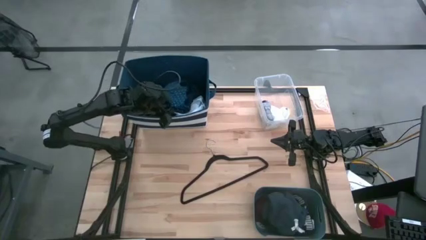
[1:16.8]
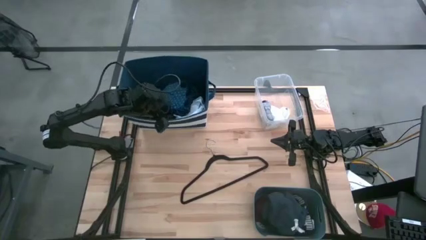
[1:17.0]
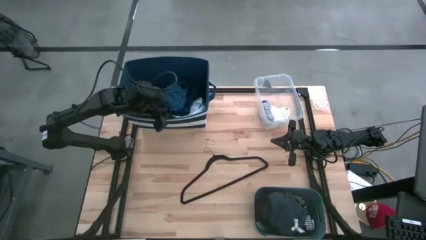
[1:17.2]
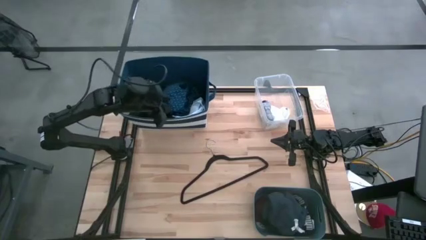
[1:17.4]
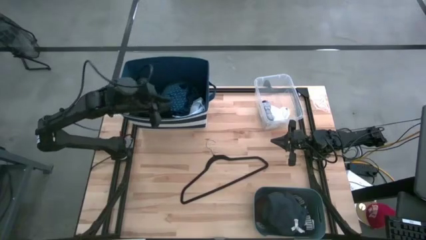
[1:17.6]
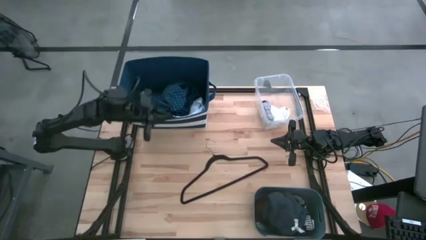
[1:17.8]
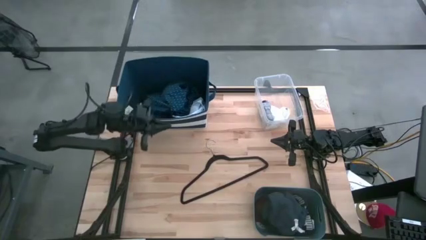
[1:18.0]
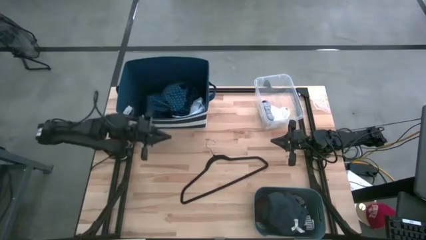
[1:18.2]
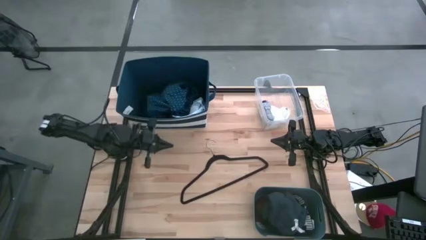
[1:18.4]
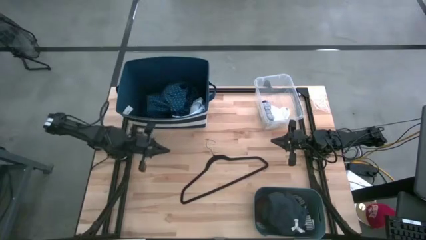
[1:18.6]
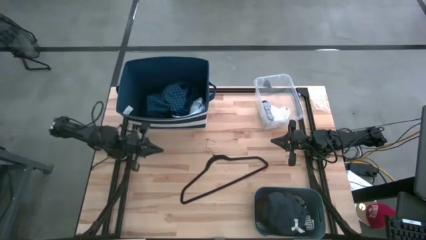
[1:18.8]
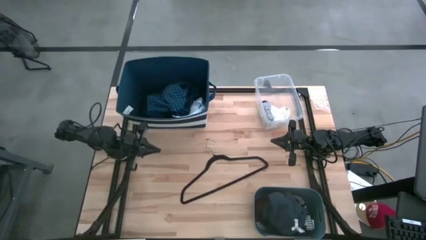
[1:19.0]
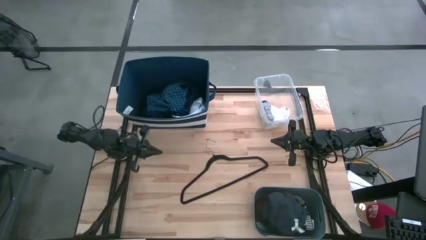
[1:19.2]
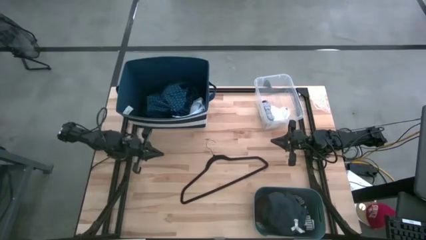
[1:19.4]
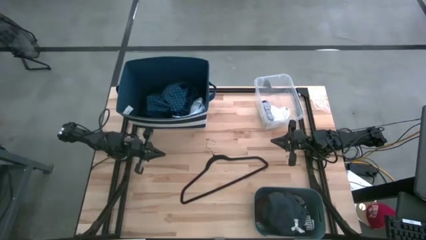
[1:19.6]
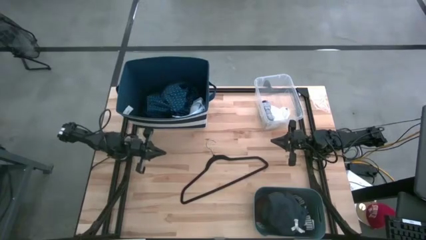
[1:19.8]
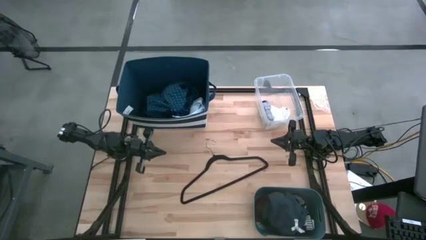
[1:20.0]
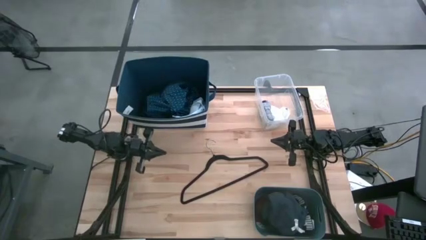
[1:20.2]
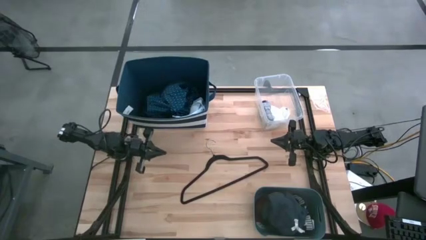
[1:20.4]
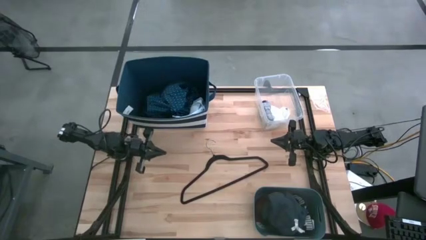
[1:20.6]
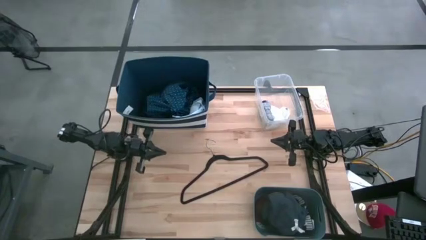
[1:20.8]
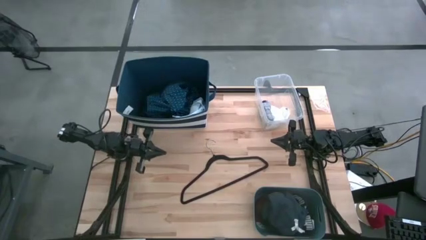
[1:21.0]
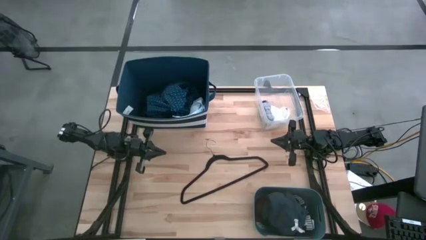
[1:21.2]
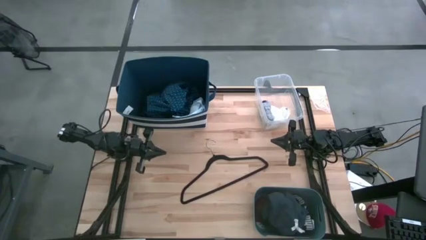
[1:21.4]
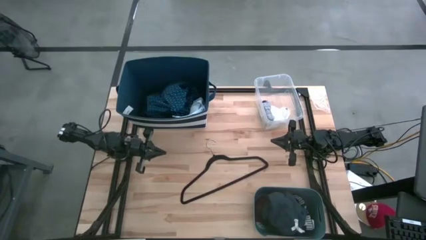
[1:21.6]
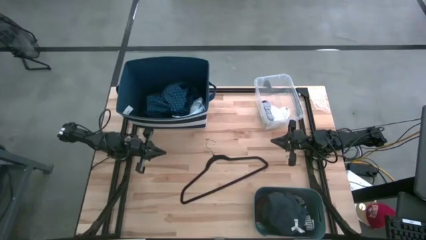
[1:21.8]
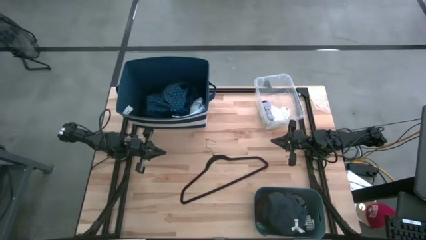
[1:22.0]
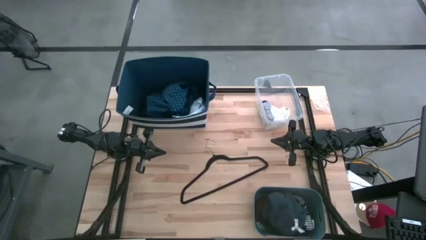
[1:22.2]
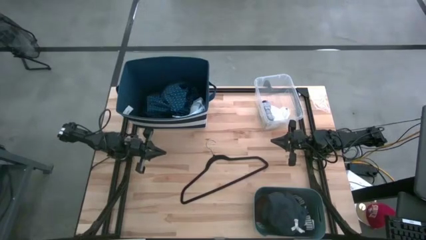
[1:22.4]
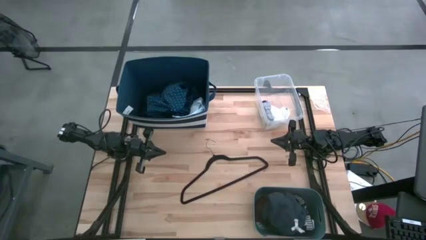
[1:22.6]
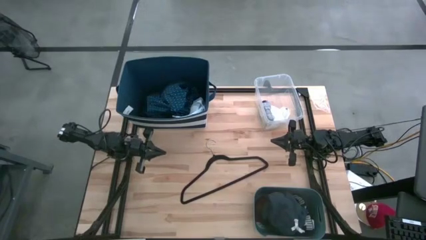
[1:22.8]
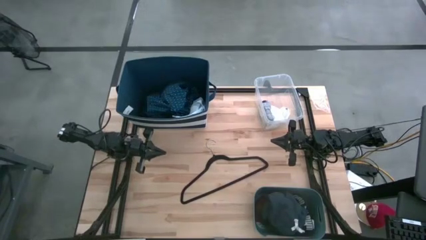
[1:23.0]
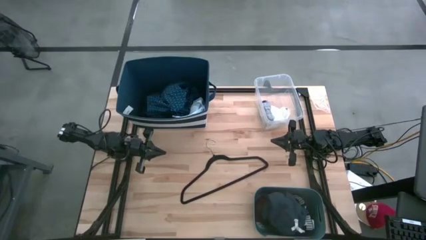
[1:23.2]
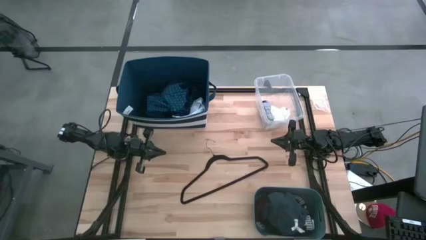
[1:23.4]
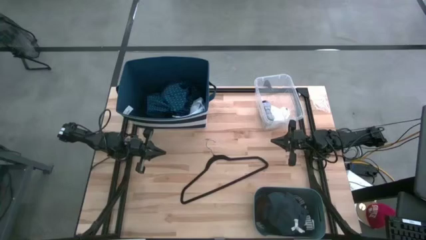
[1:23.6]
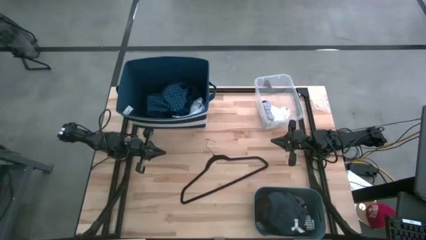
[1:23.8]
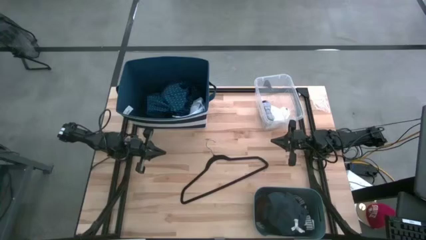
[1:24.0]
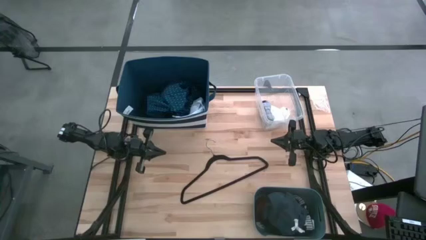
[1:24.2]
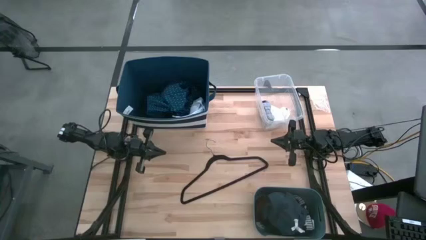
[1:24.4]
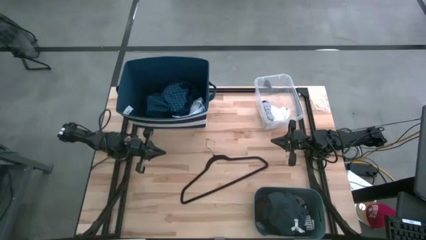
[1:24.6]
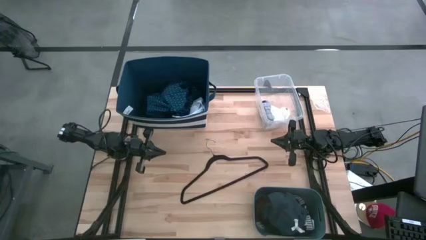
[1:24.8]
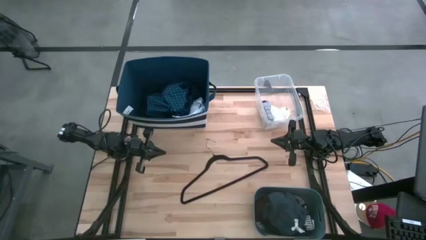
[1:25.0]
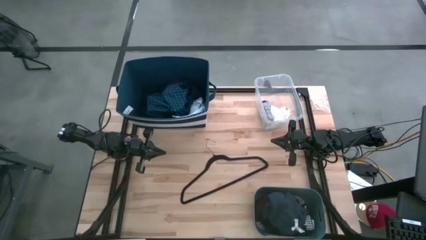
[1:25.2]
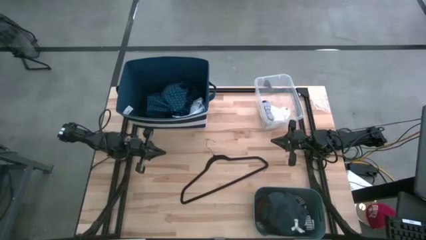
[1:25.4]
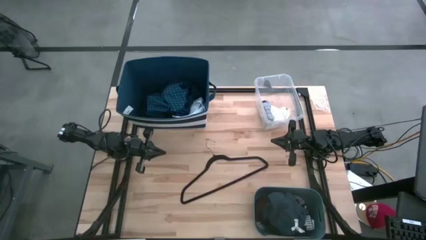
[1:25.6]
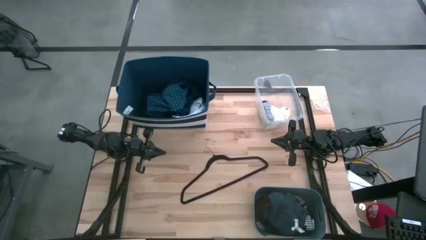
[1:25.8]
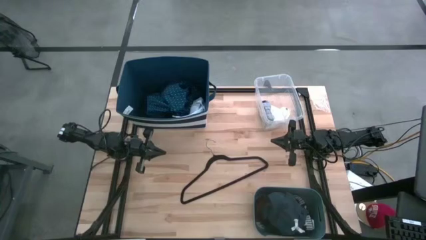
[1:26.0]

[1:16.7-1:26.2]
Task: Pick & Place Cloths
Return to Home Position

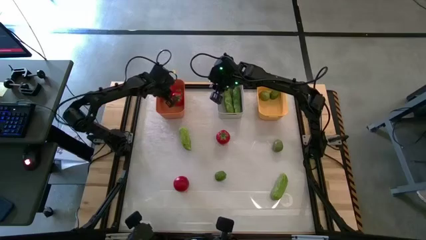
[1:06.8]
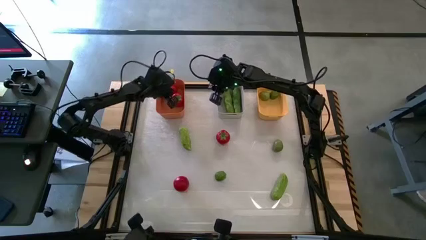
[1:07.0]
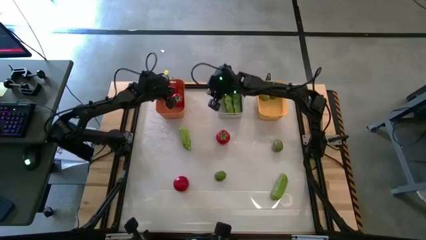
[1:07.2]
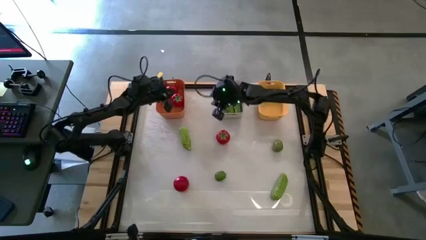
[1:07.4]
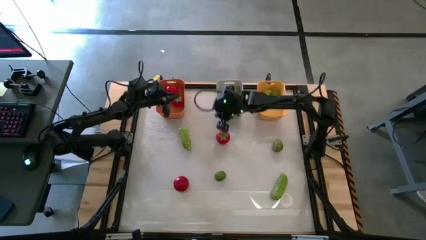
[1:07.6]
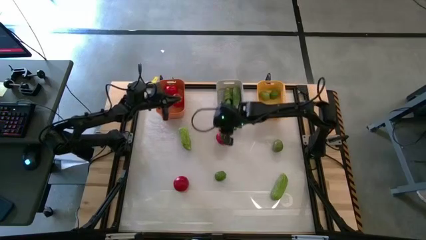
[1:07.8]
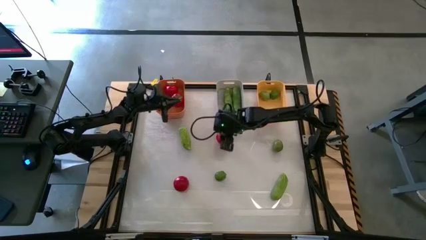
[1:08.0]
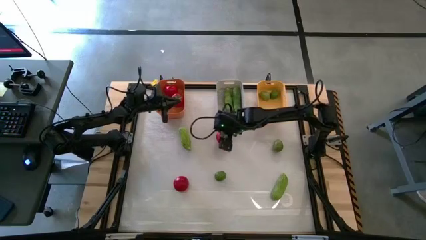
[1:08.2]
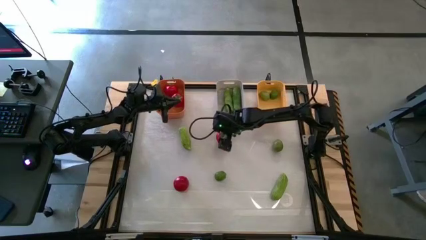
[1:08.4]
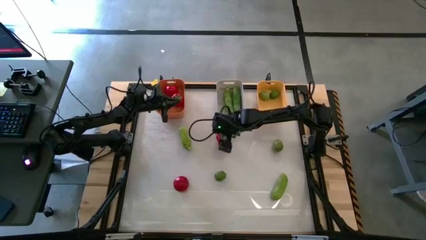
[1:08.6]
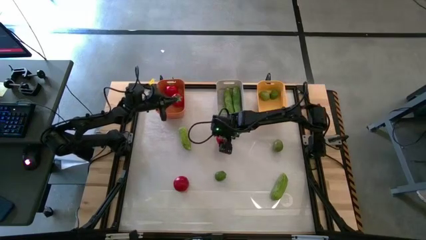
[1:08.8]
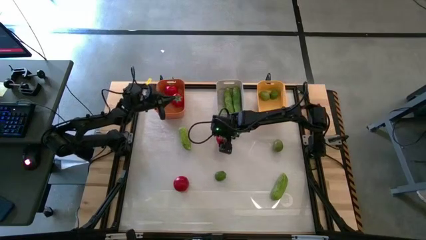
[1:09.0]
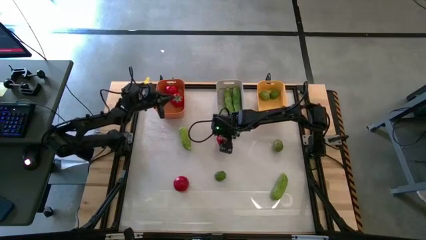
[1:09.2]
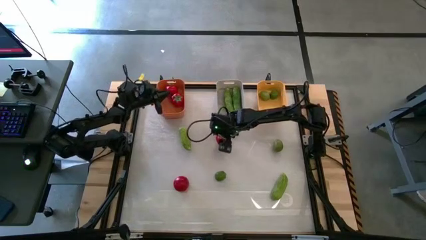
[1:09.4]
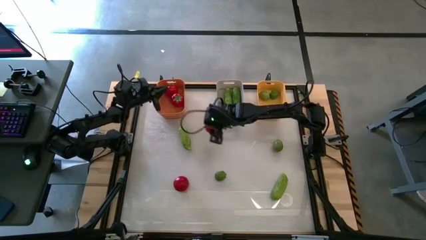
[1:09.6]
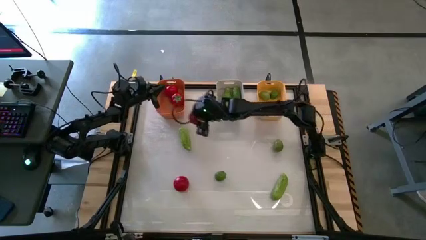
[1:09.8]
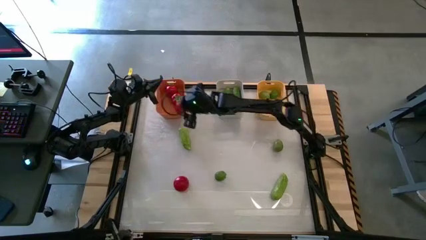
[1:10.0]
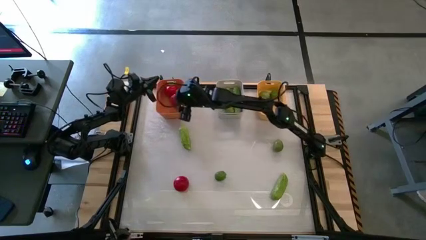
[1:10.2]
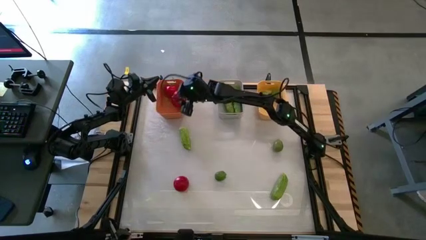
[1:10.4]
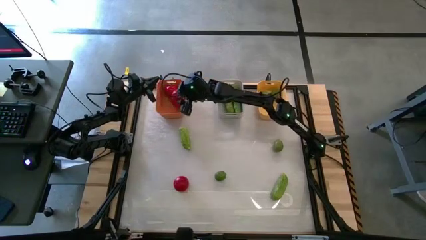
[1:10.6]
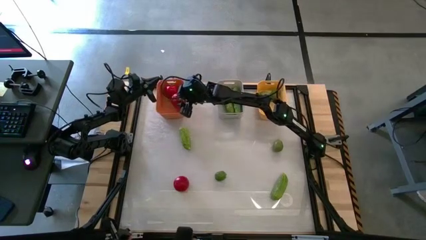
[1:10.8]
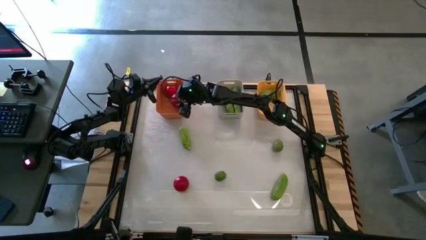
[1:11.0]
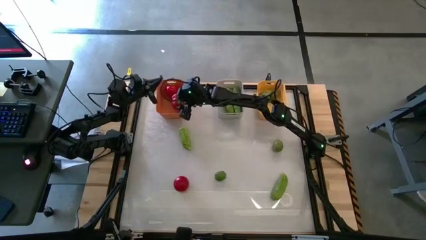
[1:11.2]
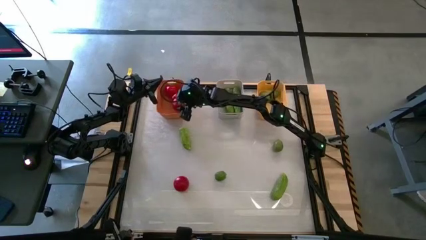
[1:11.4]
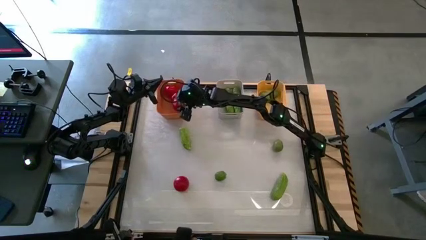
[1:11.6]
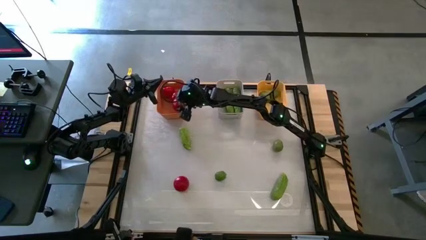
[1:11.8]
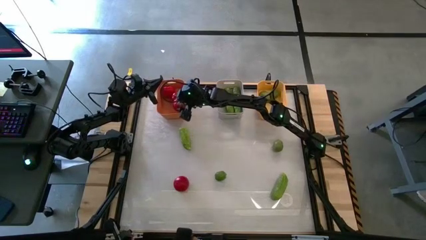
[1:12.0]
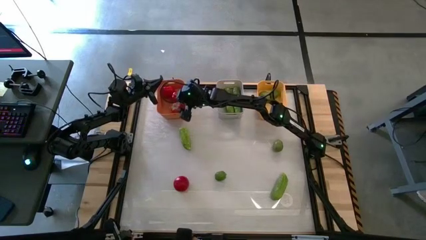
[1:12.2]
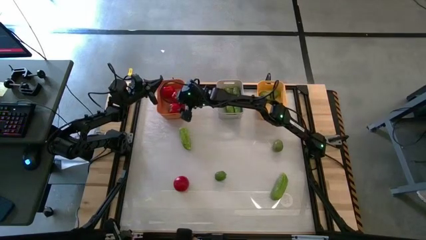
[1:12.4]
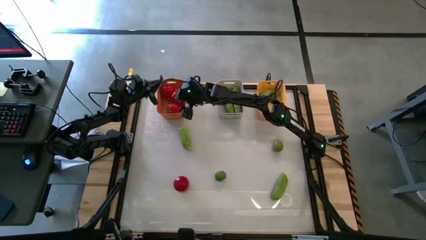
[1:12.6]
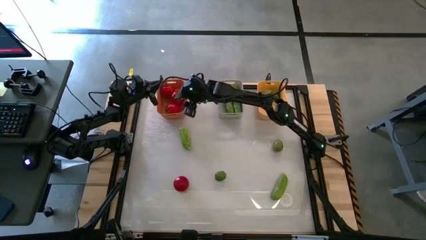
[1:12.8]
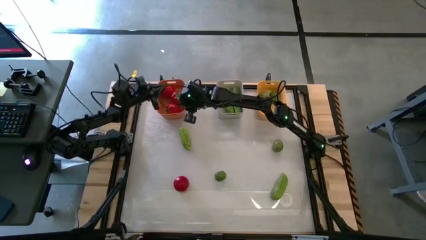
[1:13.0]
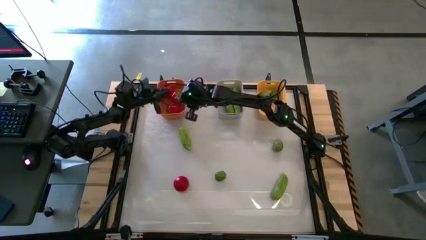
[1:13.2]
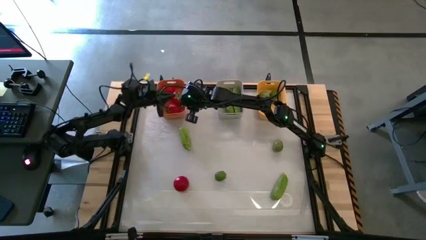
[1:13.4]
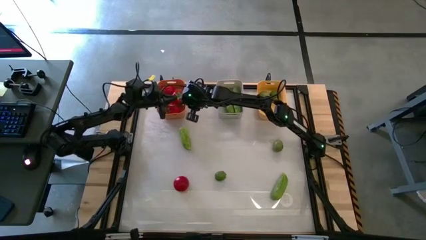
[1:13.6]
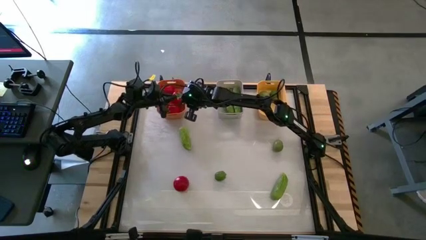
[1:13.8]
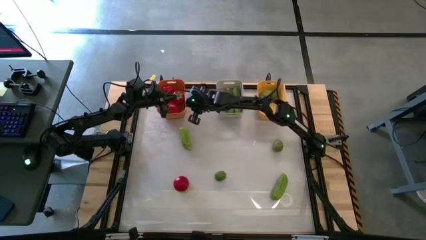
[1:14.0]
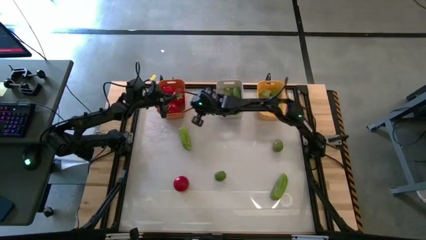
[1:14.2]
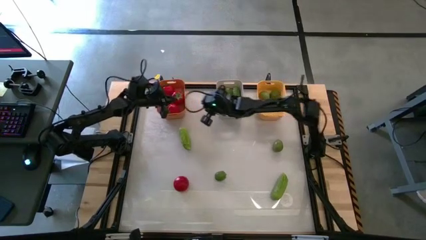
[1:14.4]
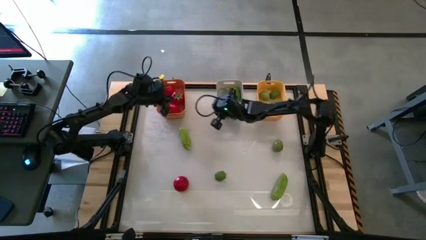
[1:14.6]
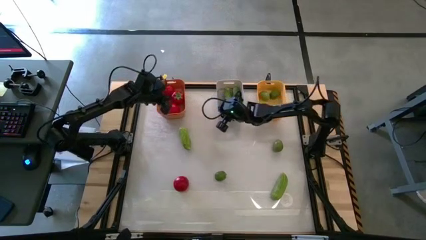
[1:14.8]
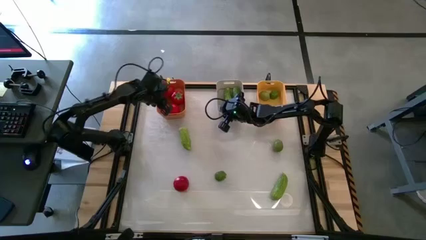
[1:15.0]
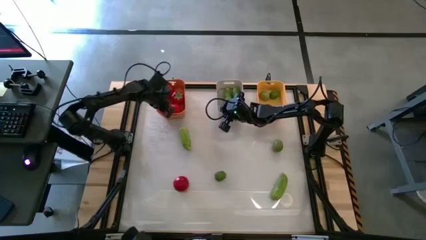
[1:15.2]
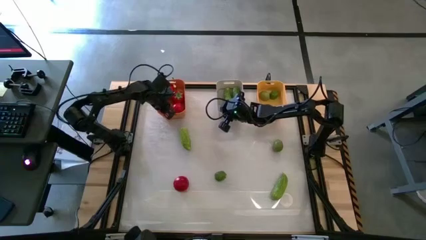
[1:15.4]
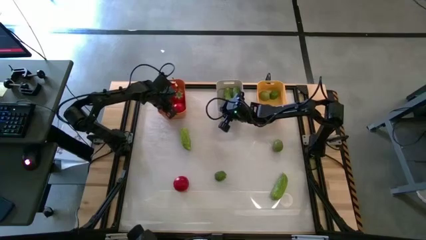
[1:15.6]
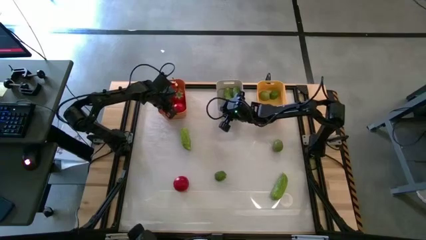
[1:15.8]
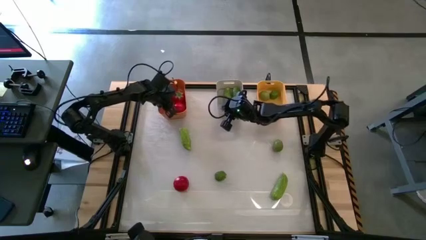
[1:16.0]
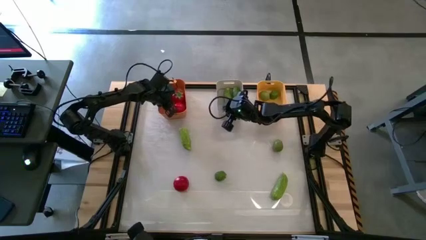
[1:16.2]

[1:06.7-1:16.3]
Task: Sort produce into baskets
Put the top tomato into the orange bin
